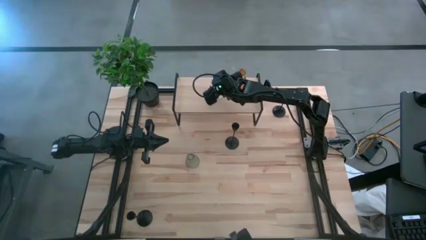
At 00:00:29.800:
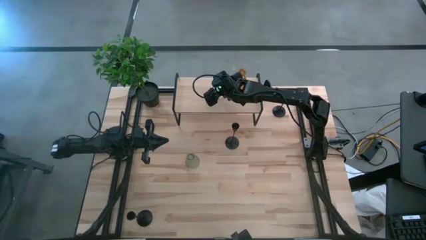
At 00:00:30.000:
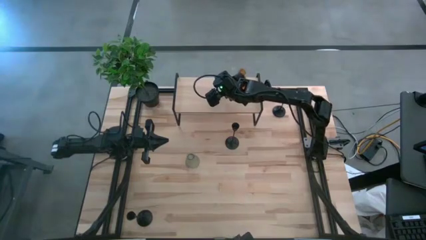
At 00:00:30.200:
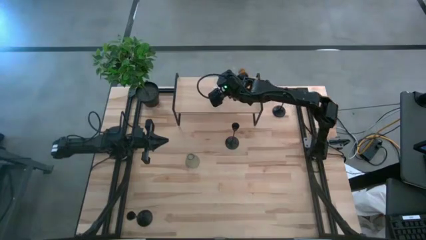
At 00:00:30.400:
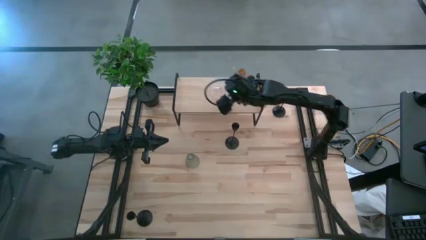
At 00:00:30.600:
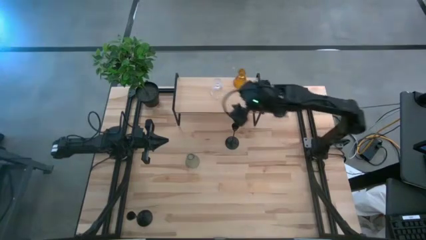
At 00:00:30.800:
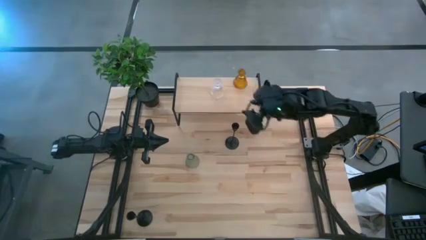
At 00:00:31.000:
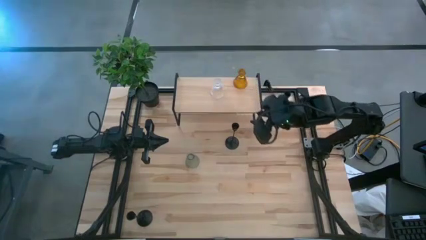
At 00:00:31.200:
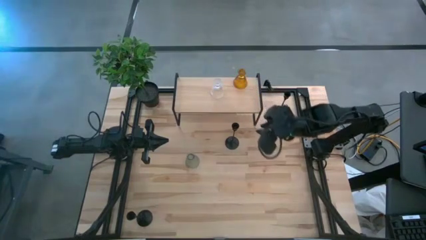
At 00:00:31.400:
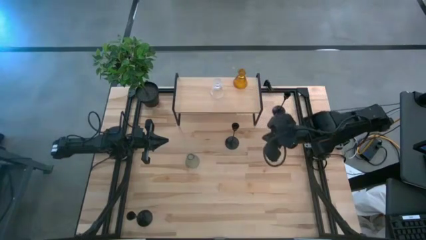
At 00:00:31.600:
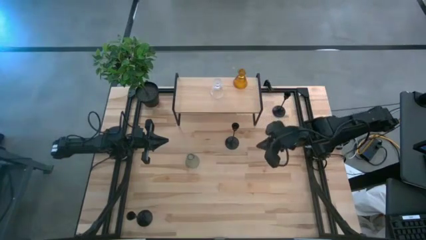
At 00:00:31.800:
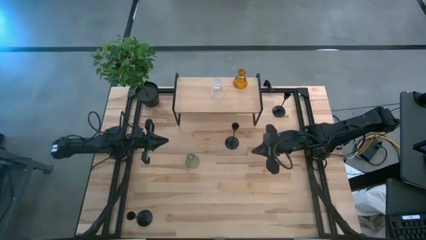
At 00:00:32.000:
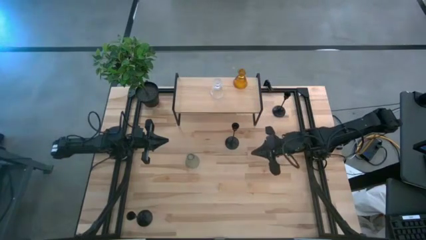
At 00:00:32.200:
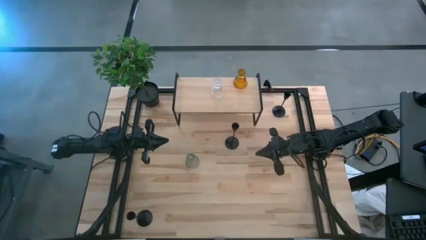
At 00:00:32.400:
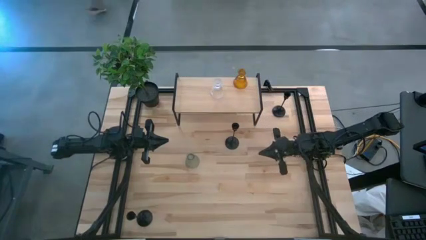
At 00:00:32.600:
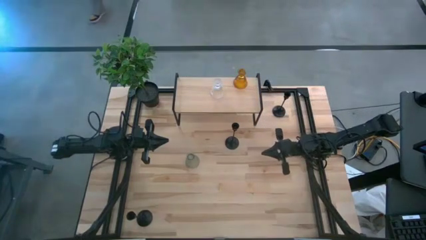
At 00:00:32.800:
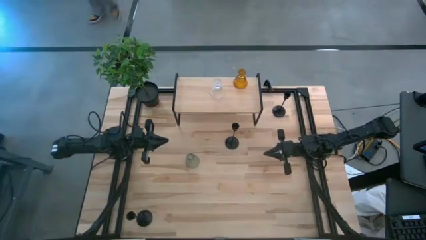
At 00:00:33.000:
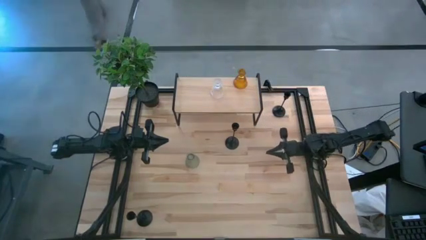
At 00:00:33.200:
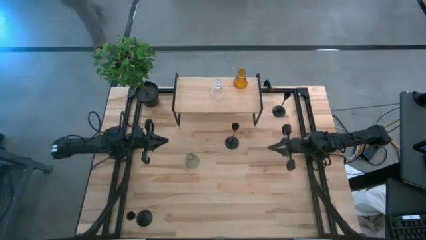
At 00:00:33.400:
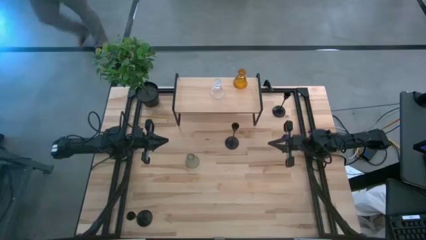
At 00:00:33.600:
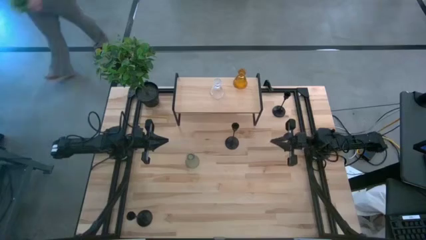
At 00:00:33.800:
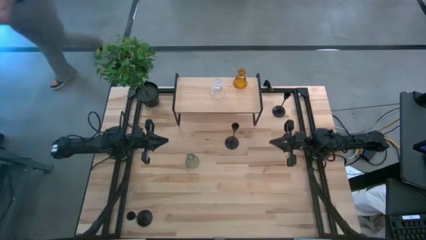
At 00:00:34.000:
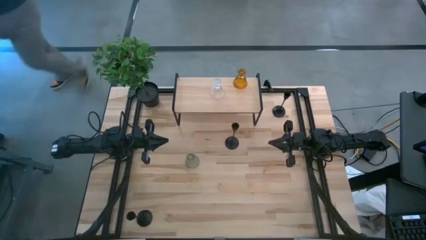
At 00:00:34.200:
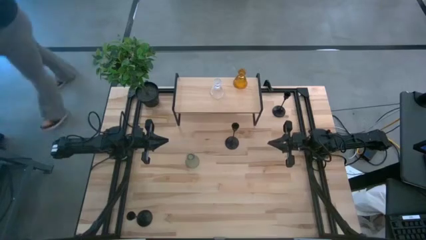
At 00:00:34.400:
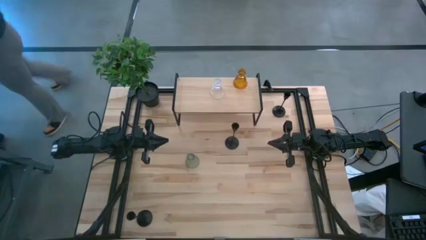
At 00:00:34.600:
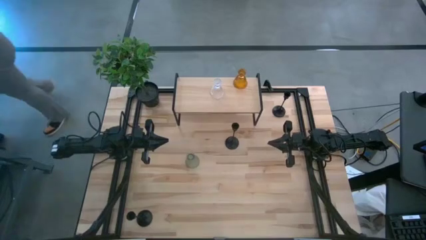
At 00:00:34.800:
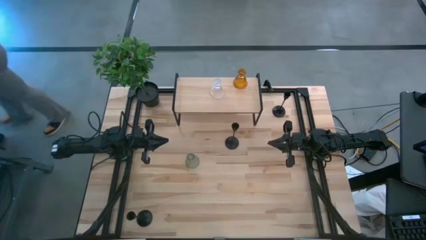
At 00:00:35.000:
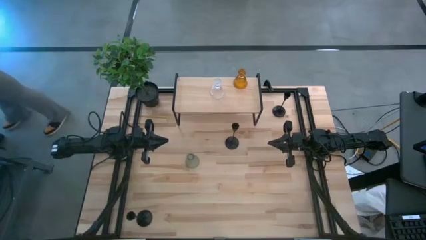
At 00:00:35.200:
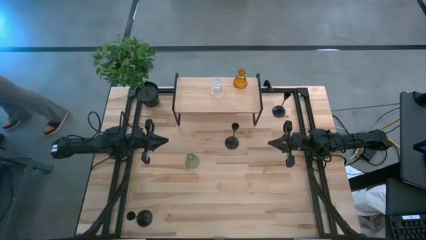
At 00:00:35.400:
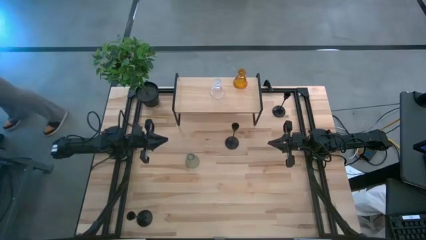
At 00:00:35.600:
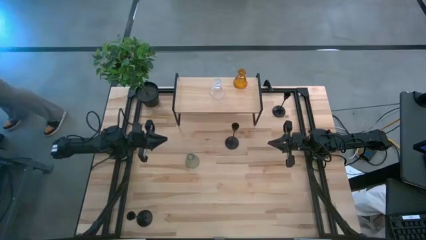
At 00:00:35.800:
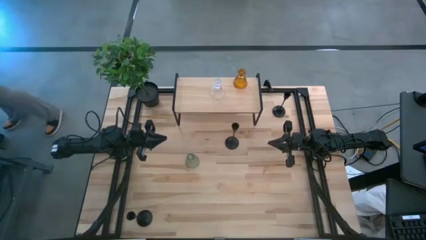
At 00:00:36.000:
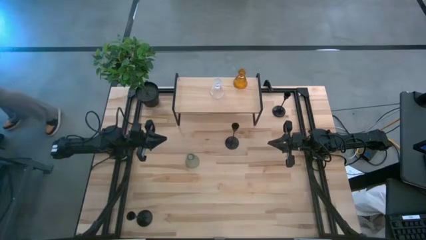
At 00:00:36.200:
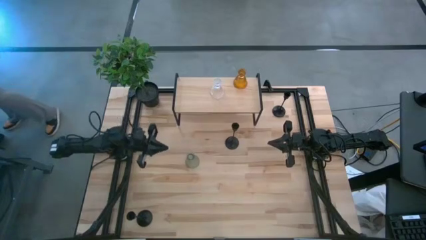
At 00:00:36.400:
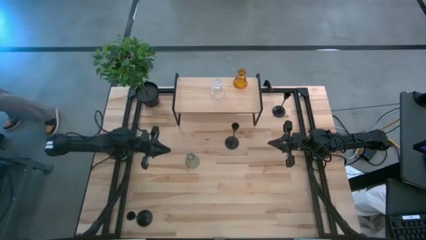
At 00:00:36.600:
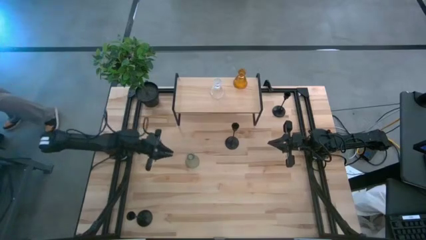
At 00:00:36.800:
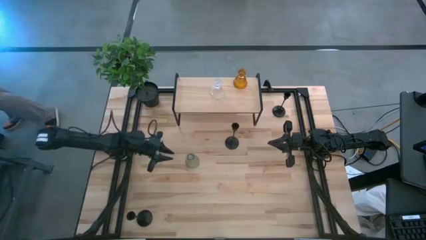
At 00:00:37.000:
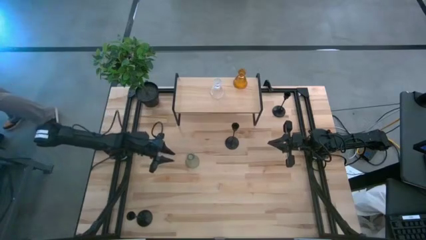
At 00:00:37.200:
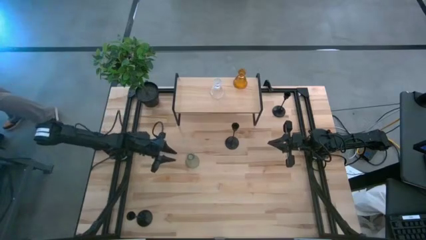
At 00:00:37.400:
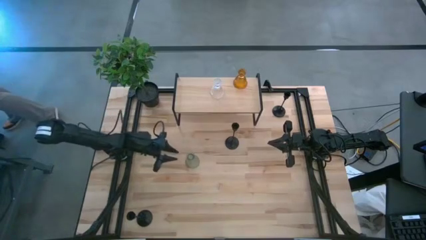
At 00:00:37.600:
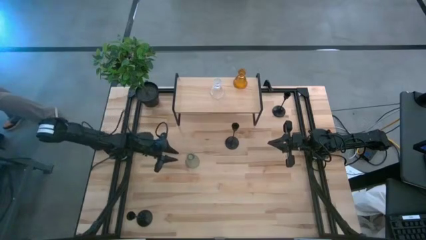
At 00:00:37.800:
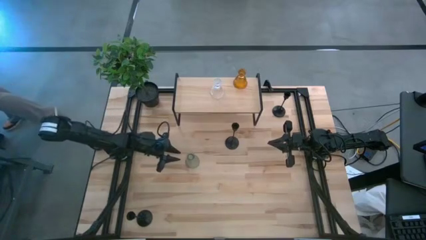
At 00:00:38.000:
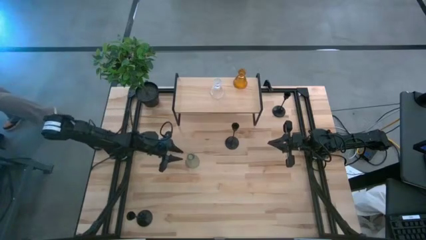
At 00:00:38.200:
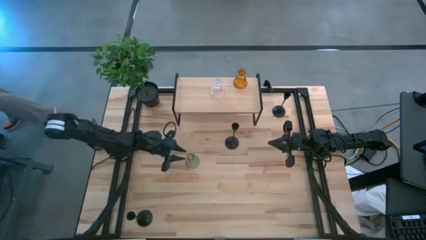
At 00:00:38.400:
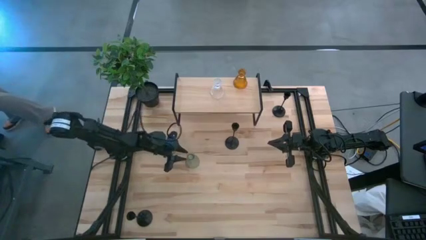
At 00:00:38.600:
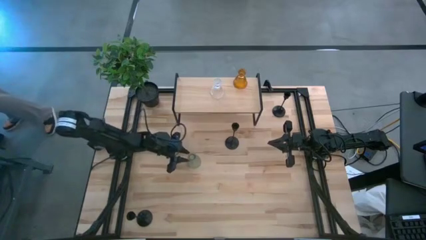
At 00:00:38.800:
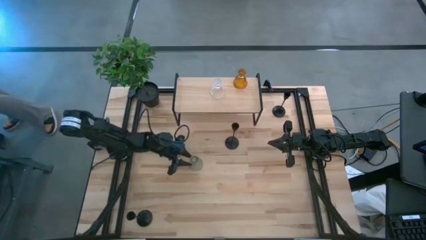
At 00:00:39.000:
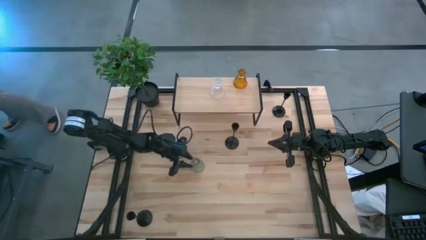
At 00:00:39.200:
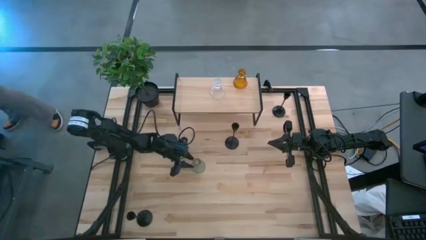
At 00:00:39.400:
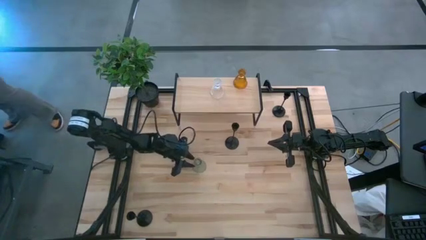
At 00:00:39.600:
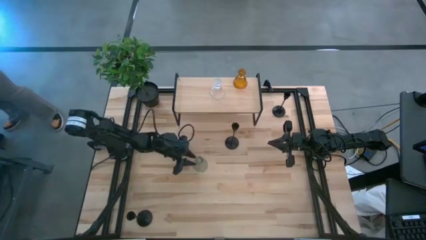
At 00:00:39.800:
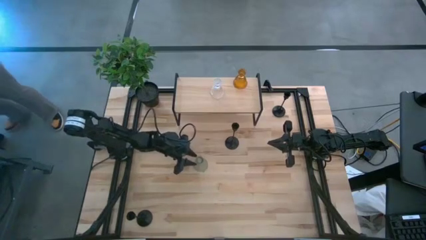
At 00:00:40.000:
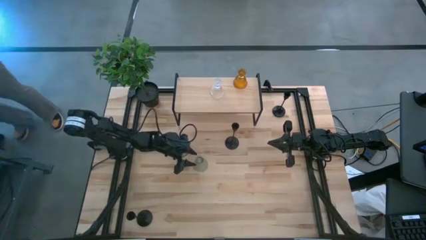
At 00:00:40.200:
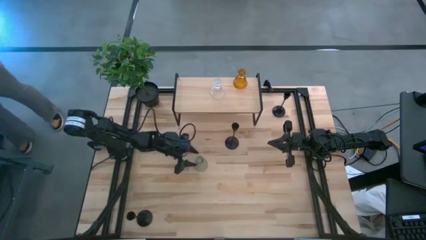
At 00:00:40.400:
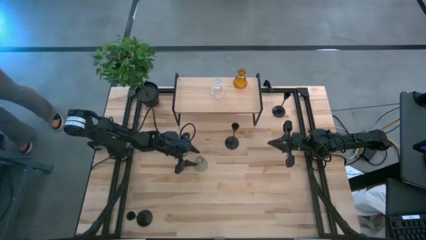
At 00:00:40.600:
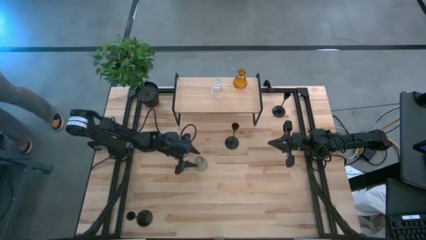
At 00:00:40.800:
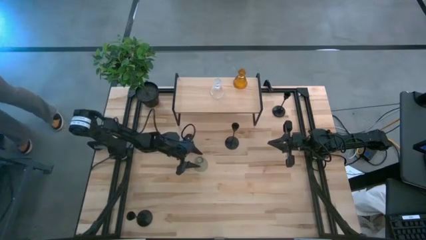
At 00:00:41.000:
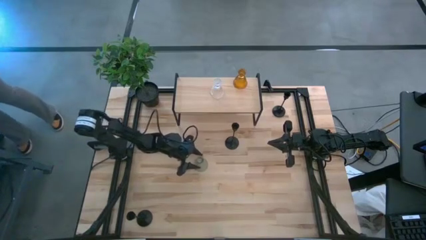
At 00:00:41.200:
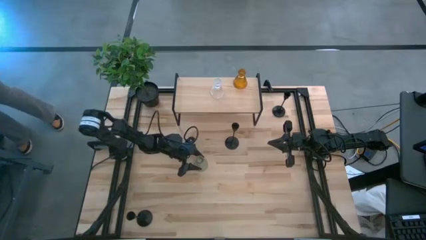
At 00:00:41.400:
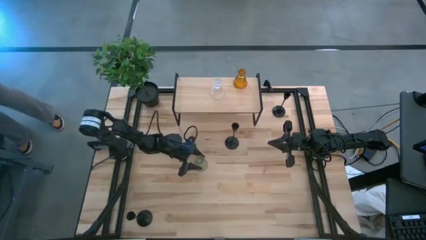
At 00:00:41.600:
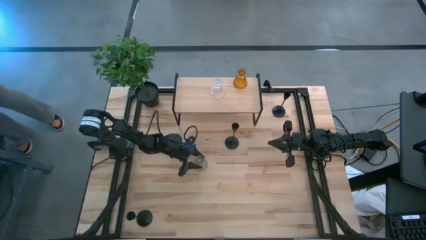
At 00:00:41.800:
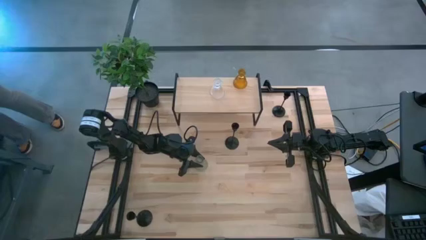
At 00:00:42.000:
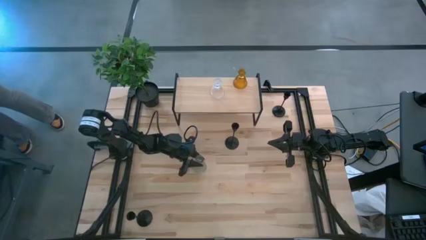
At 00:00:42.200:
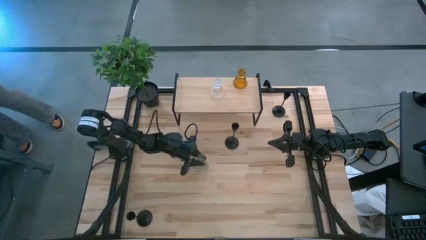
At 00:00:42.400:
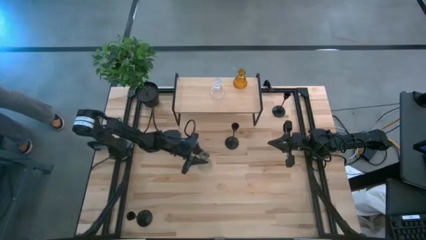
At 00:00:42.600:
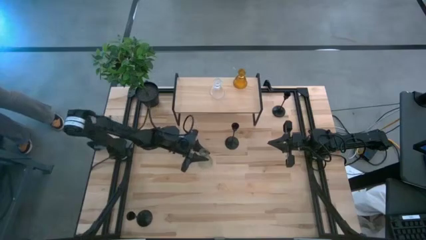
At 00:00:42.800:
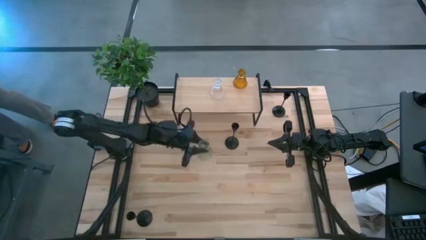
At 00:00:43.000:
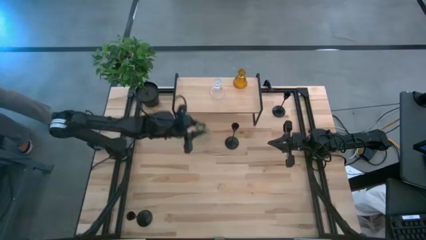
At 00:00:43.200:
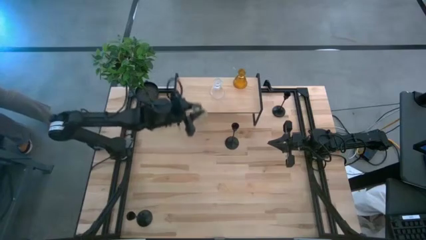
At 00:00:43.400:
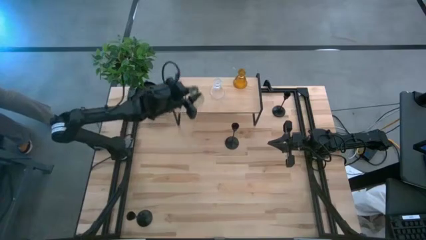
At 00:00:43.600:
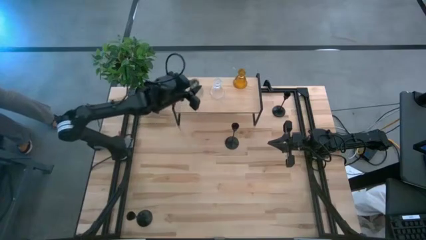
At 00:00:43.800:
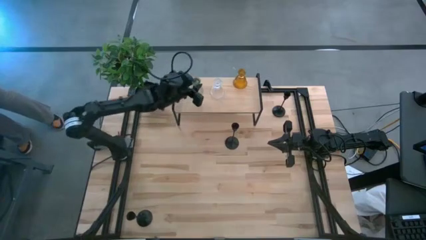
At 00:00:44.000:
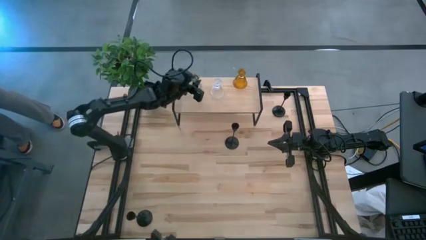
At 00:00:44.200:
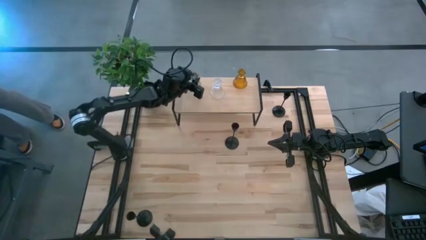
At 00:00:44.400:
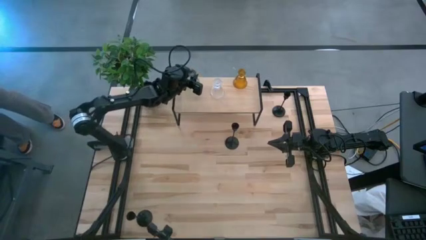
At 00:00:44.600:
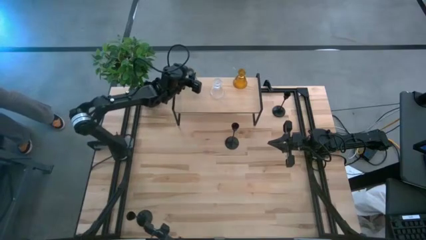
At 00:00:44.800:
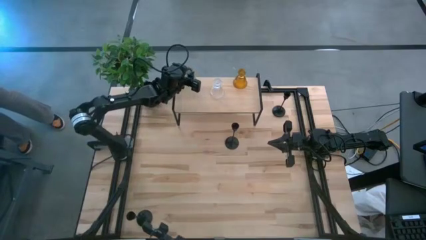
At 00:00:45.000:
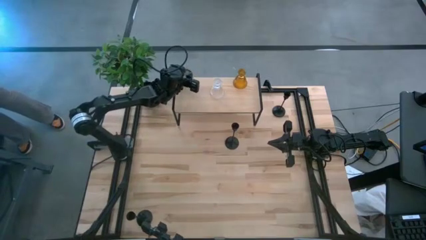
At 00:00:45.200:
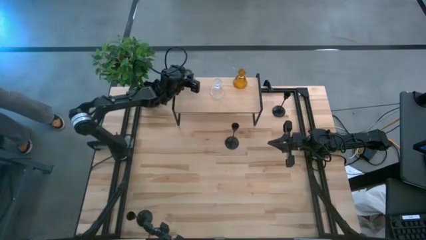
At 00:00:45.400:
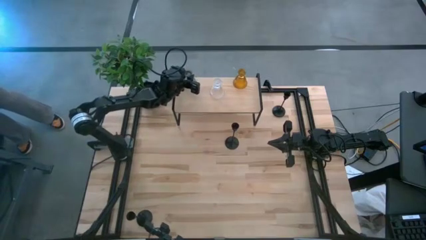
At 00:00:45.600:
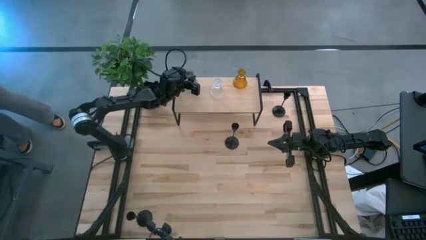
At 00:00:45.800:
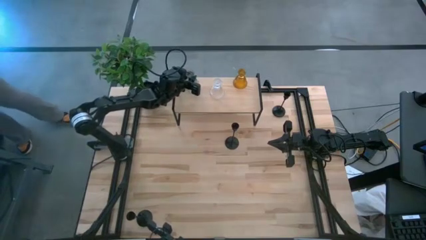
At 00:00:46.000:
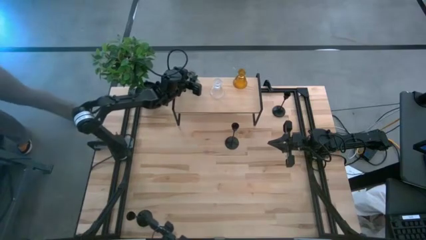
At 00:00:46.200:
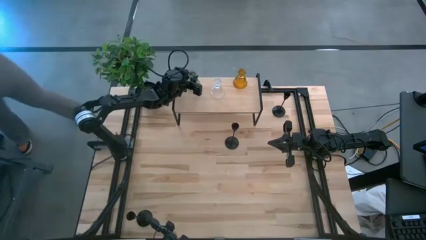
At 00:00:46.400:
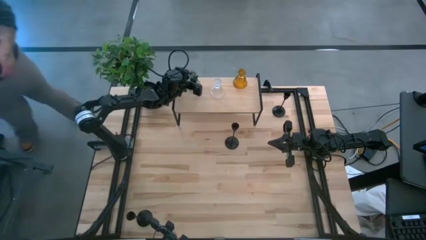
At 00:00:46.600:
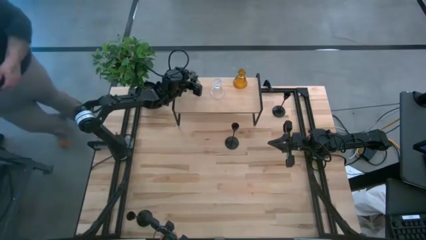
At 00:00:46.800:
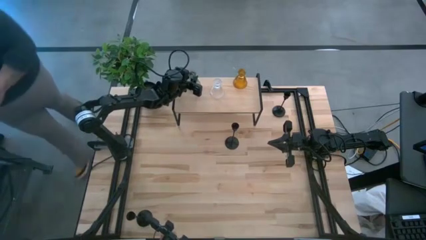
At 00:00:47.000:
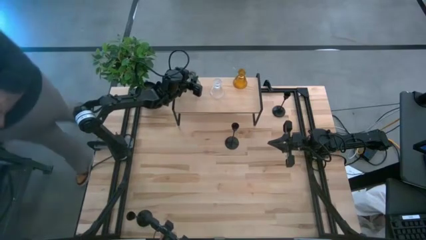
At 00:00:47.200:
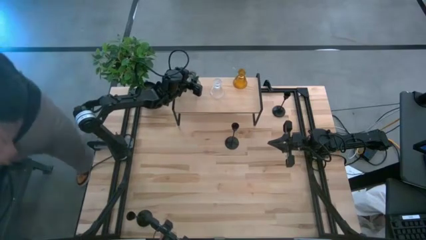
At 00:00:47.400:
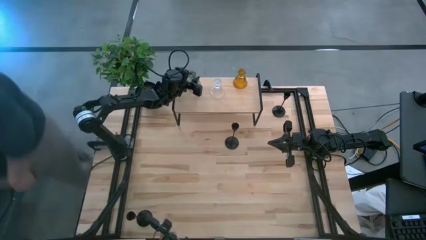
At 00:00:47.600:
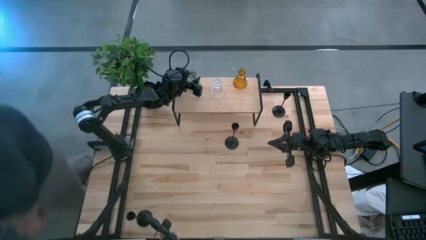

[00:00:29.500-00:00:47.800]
Task: Pick & Place candle stick holders
Put the green candle holder on the shelf
